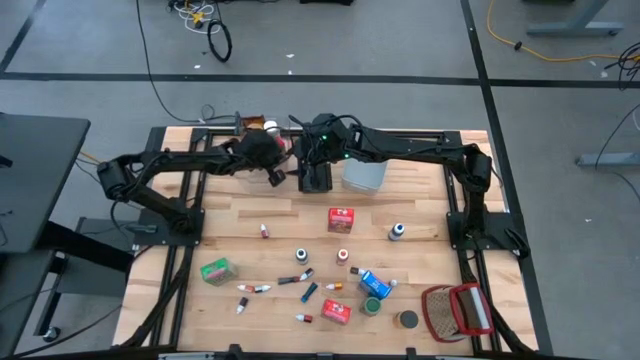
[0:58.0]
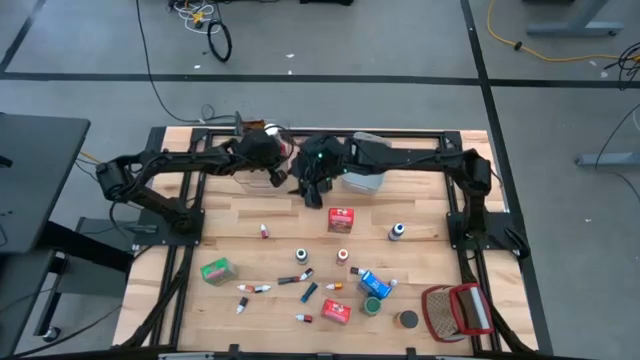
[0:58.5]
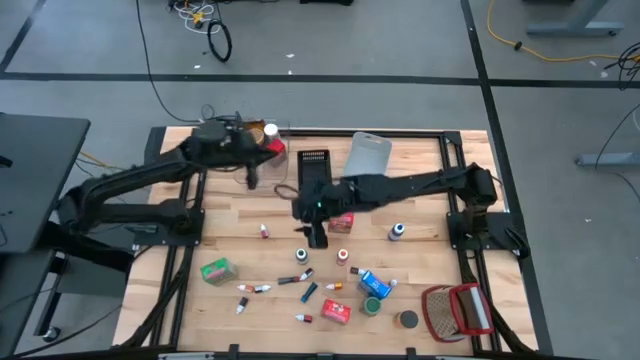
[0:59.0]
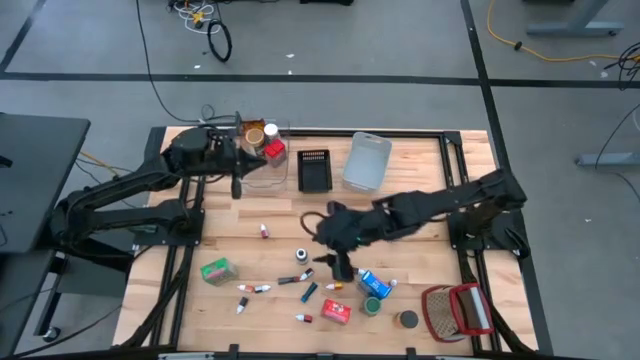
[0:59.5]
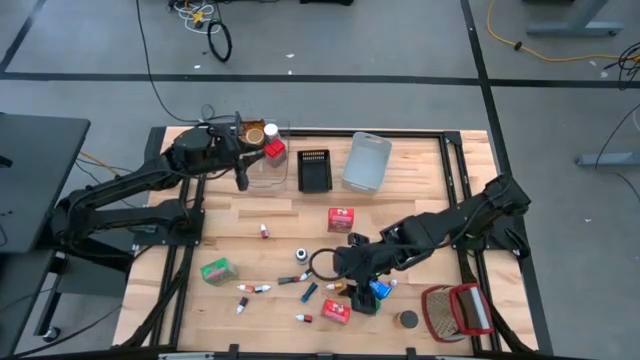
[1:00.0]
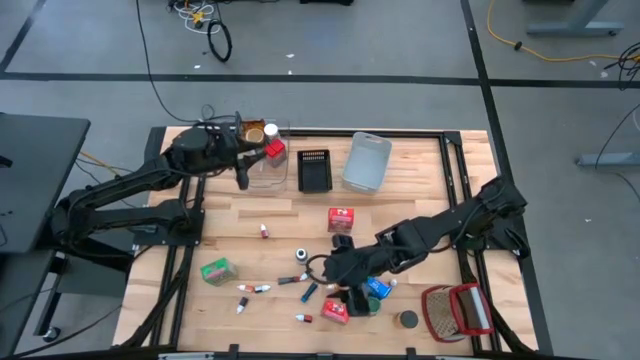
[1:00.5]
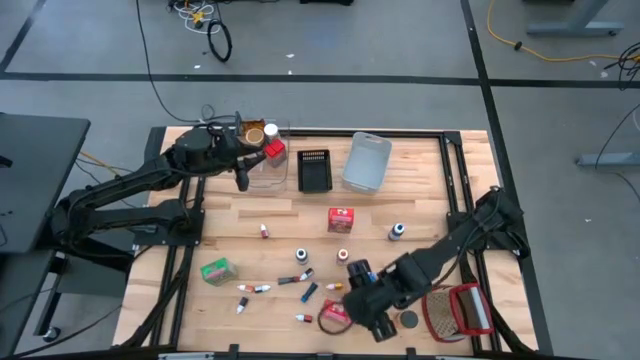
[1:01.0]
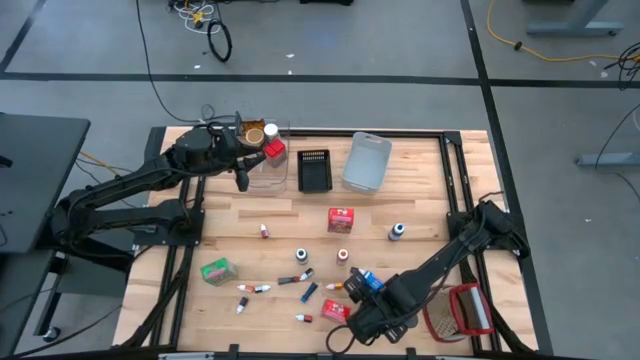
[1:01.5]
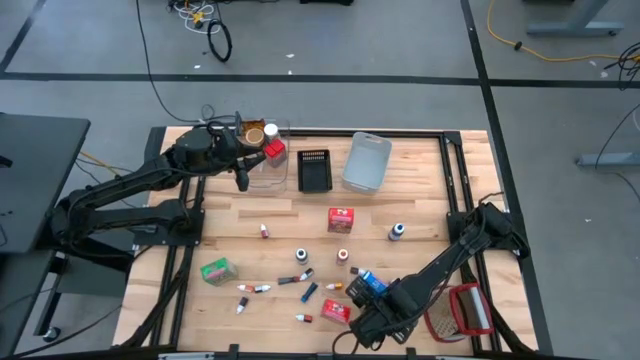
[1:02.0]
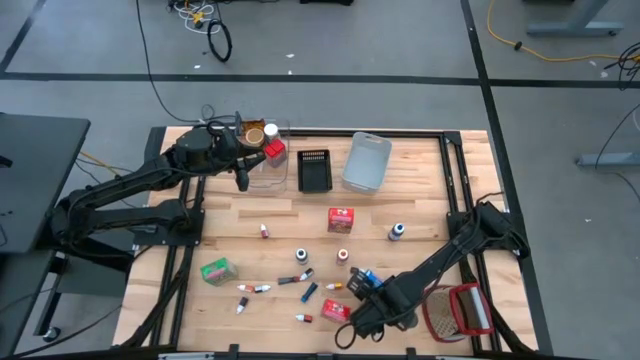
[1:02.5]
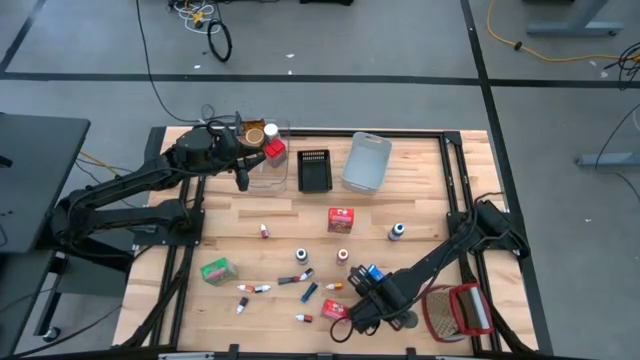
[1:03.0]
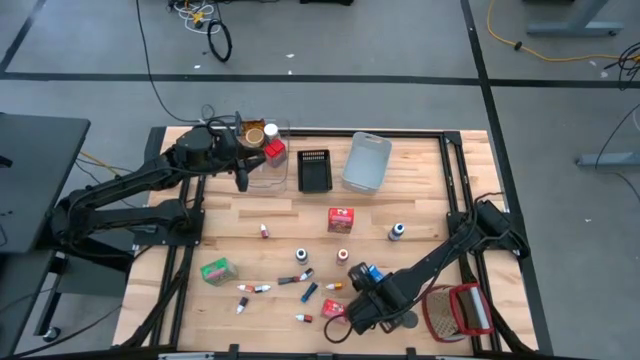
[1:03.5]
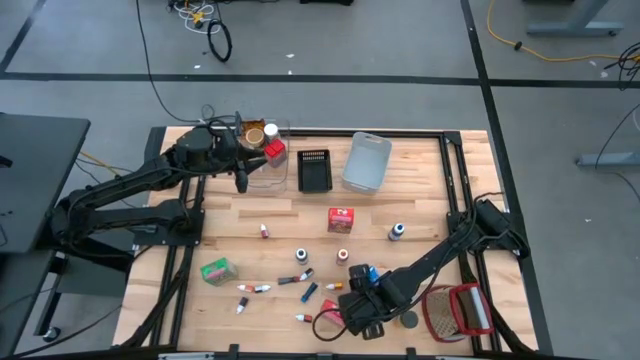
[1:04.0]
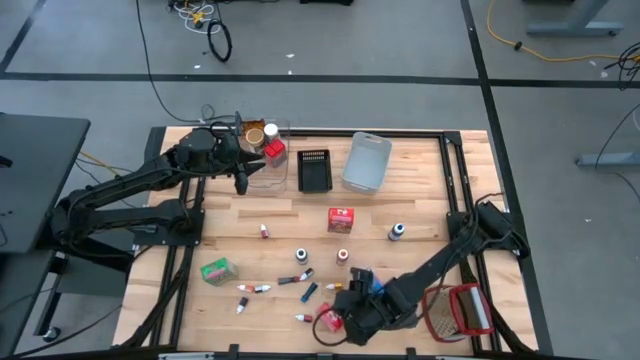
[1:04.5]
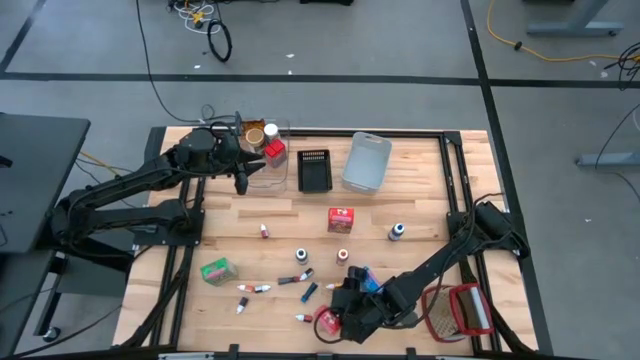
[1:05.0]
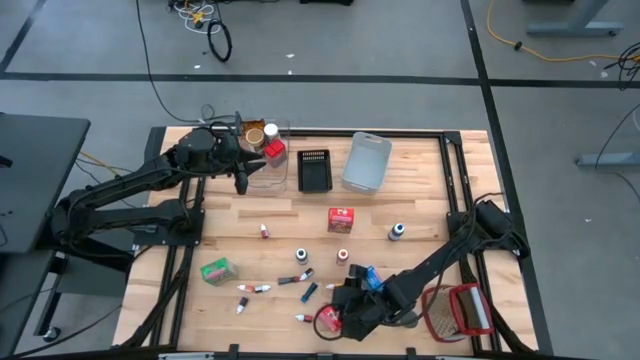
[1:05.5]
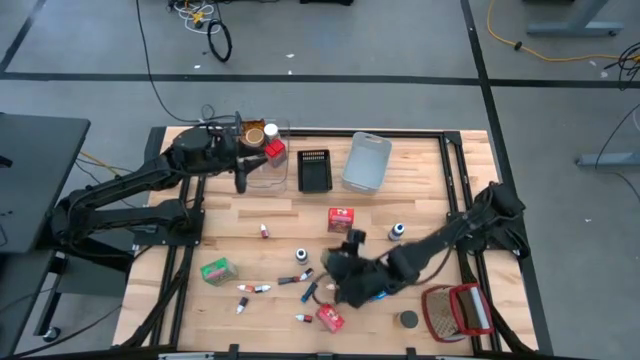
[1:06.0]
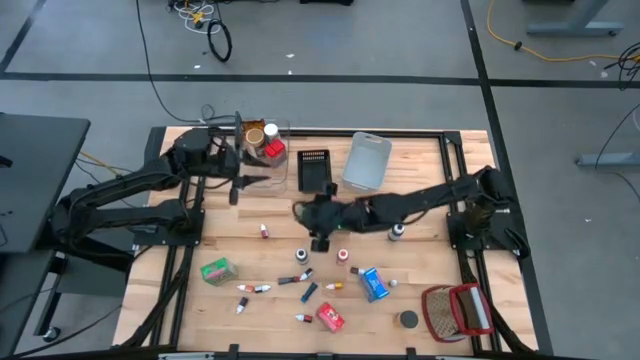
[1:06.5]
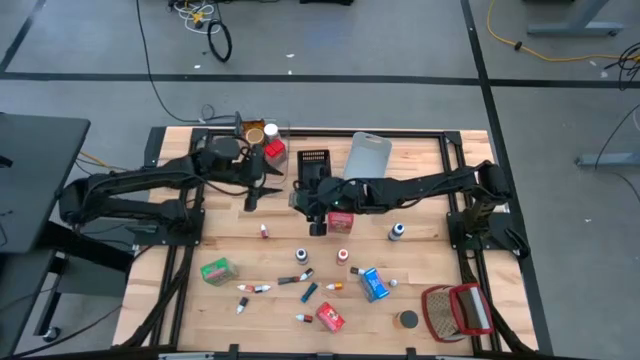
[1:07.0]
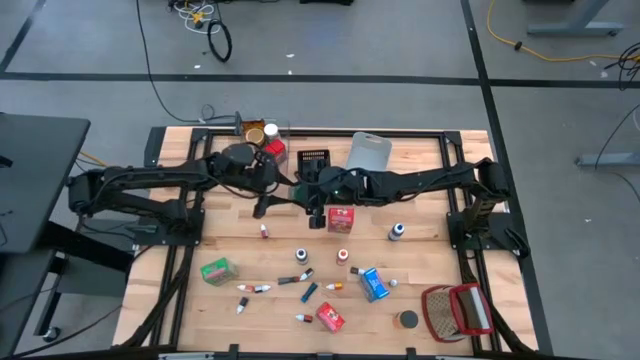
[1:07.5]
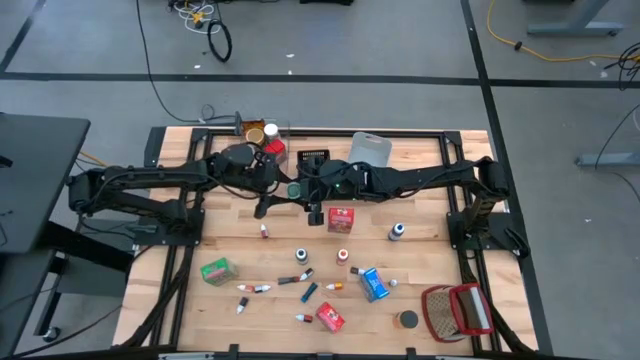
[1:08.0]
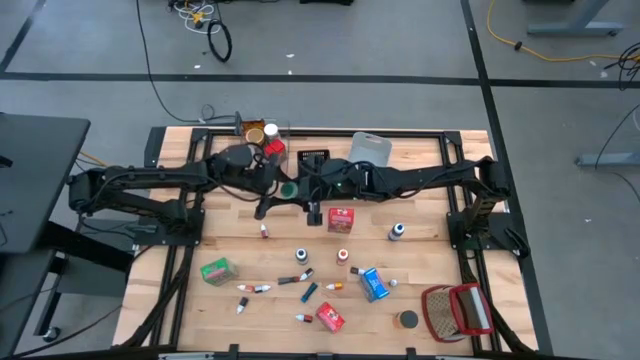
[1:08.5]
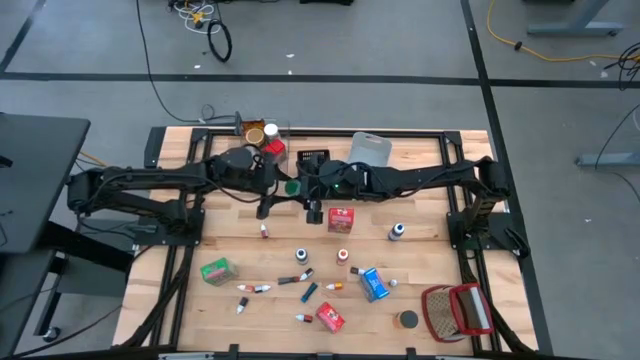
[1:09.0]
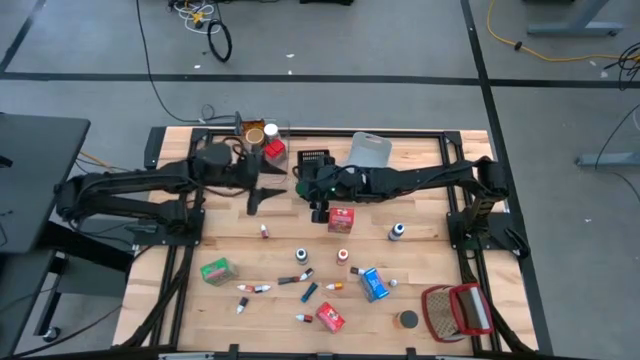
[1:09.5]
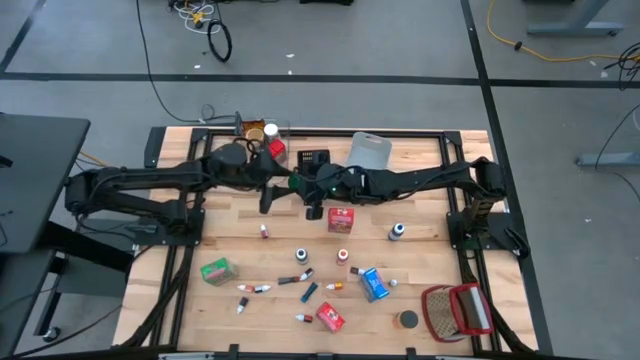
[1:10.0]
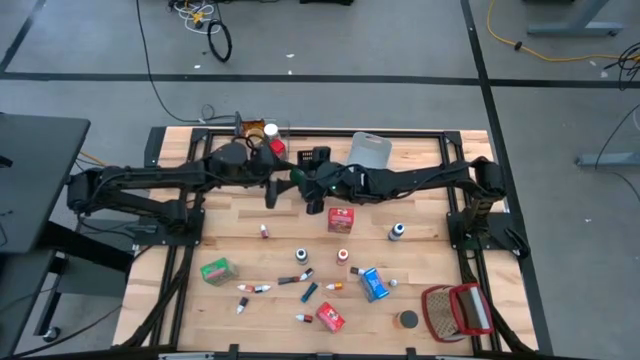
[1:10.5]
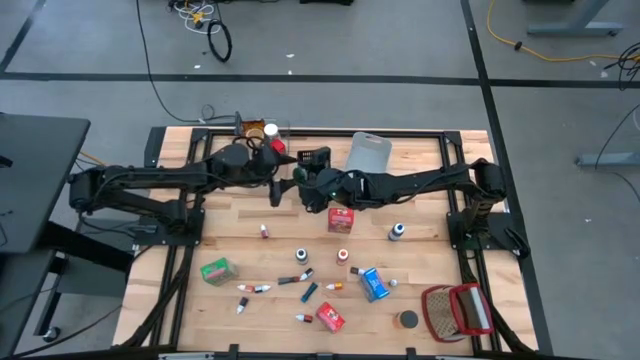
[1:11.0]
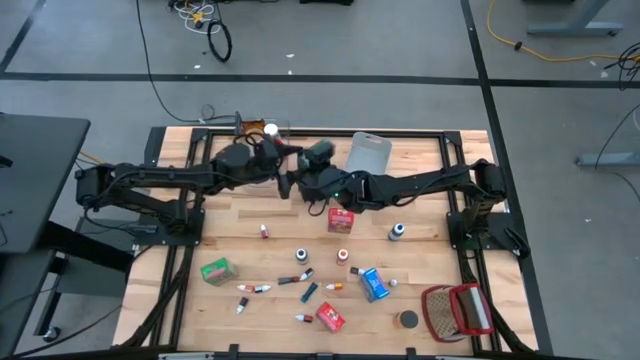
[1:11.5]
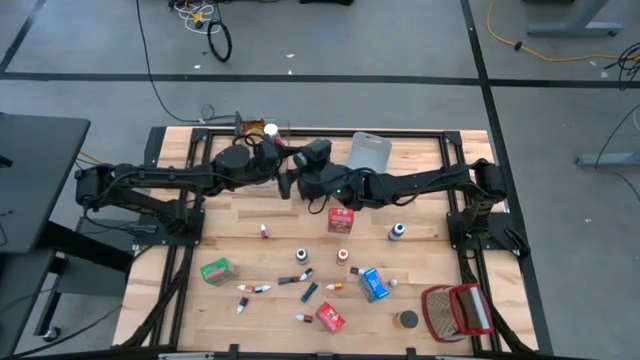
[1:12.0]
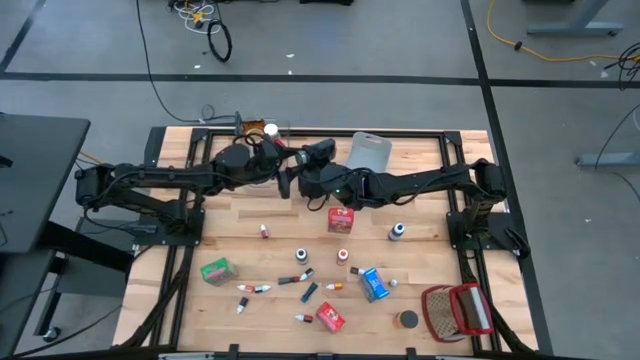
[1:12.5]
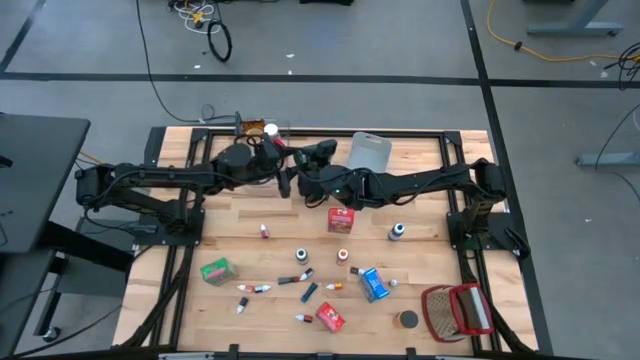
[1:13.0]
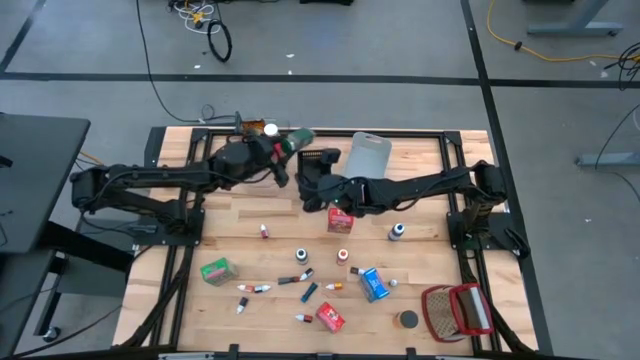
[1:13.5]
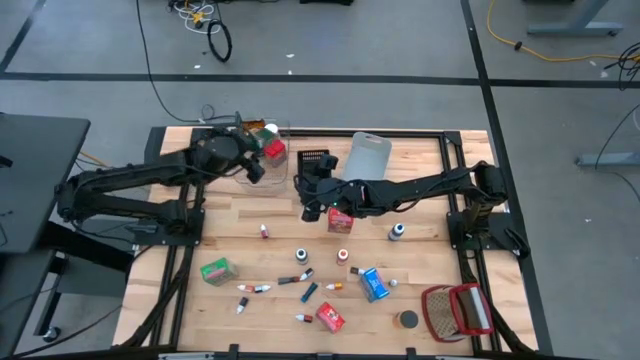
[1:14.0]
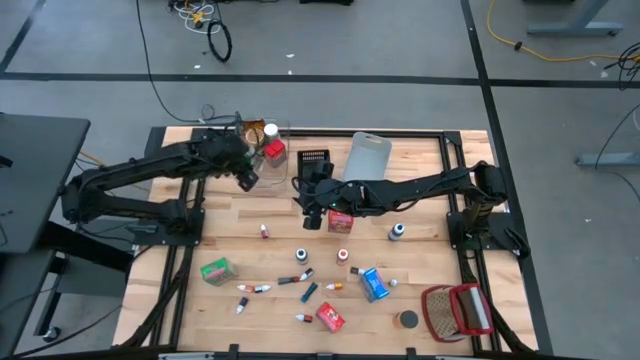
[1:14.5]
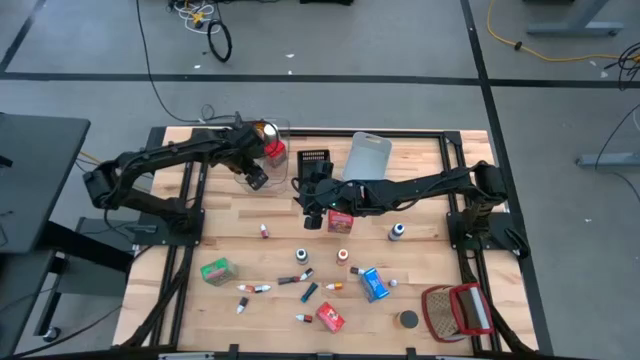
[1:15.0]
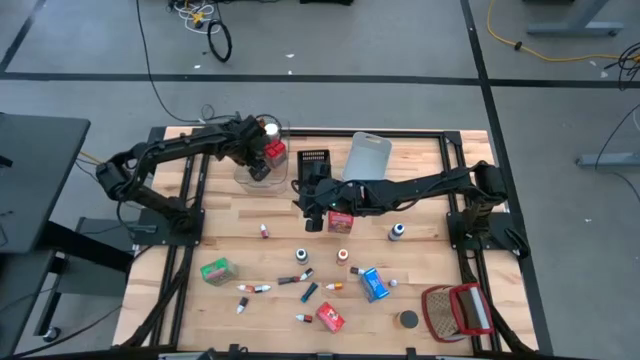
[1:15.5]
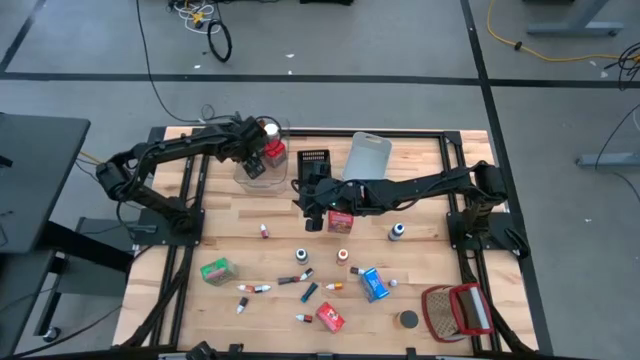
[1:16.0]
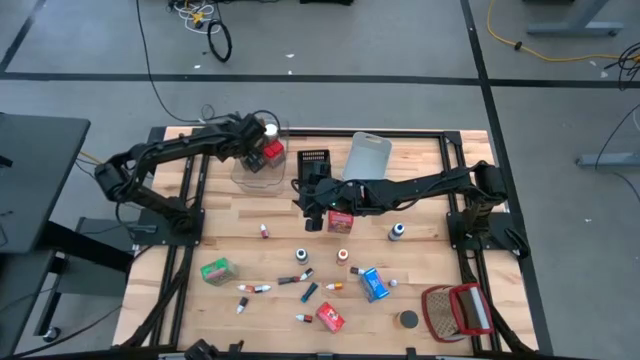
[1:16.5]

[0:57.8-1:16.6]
Task: Pick & Place Kitchen Items
Put the green spice bottle into the transparent bin

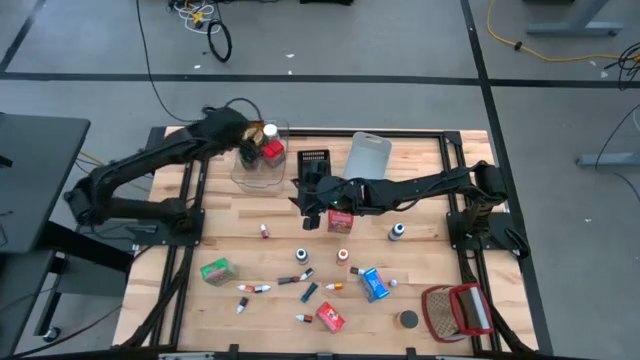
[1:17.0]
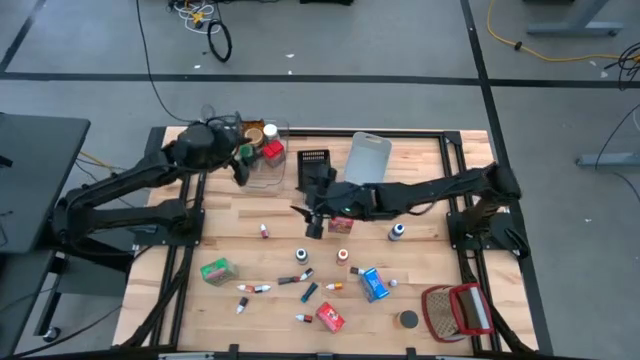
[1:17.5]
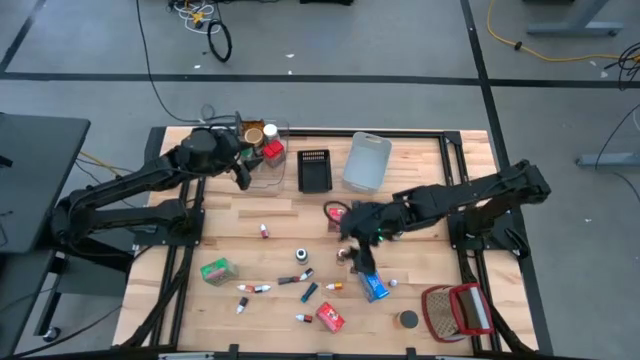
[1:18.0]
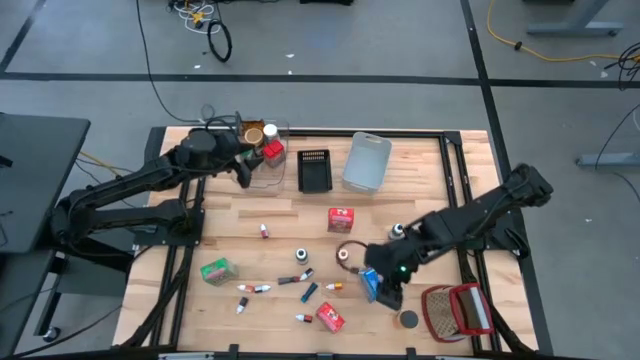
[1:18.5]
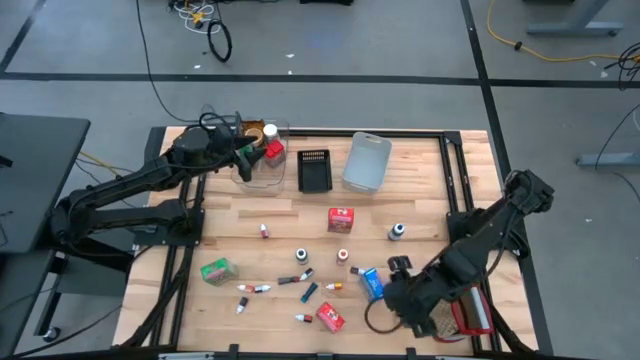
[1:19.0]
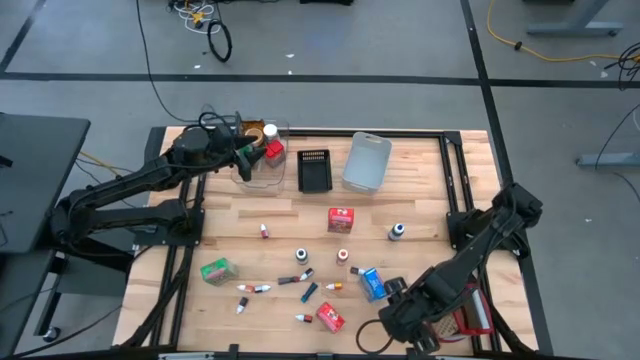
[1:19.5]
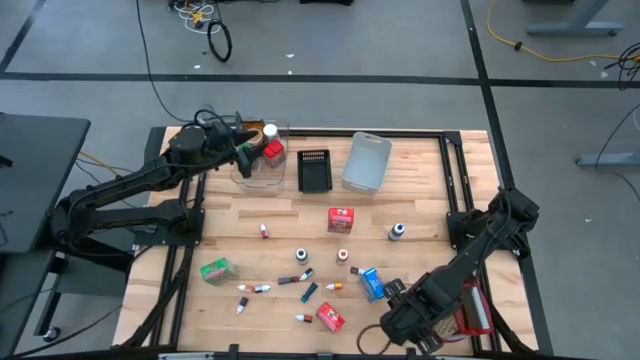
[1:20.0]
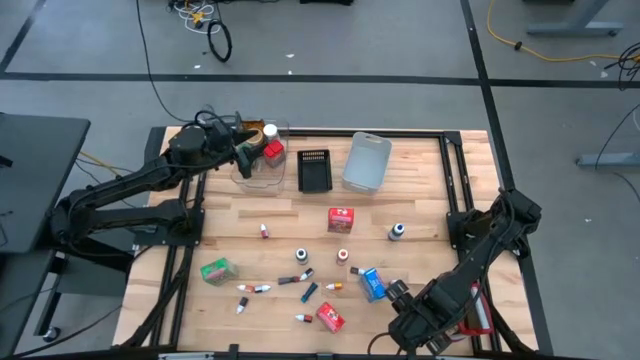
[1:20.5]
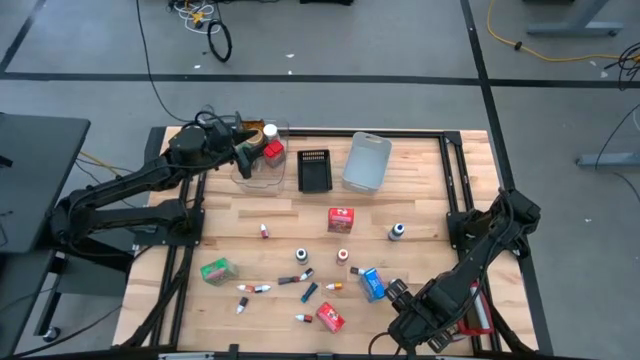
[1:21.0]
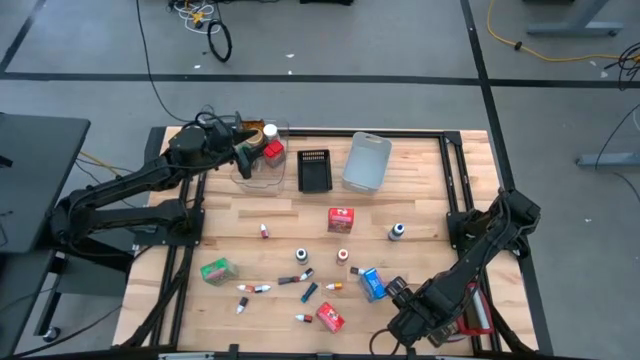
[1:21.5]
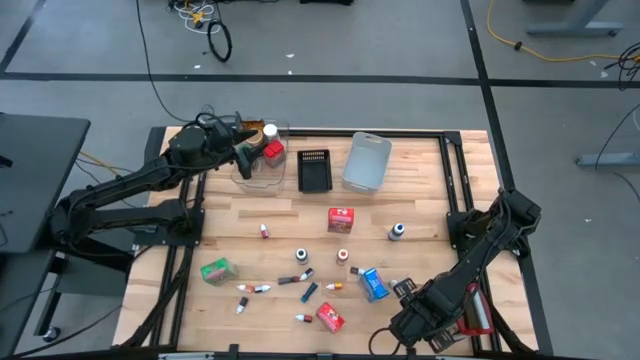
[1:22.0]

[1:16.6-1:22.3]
Put the black seasoning bottle into the transparent bin
